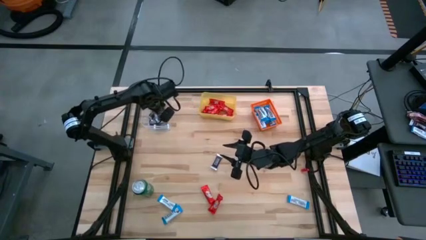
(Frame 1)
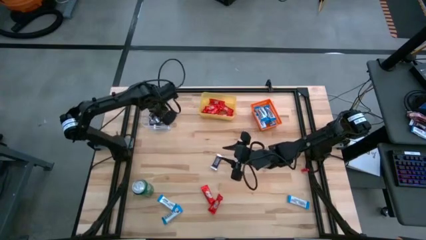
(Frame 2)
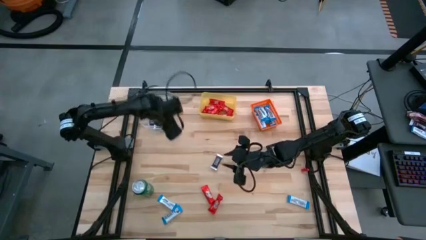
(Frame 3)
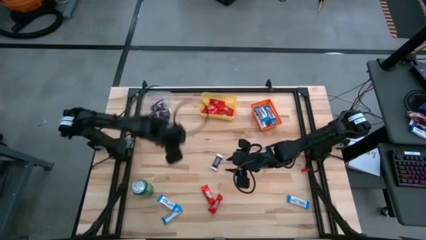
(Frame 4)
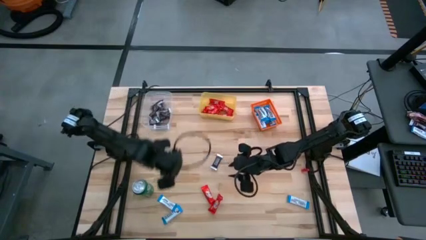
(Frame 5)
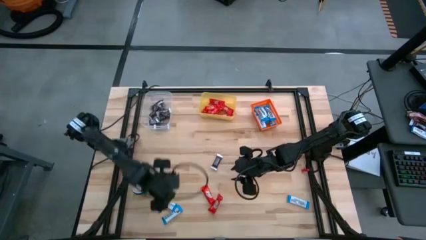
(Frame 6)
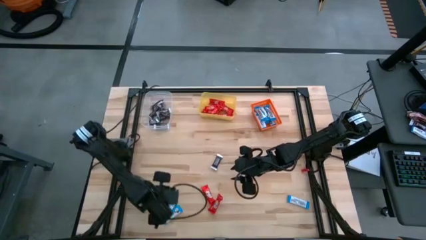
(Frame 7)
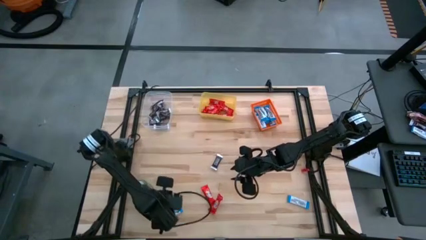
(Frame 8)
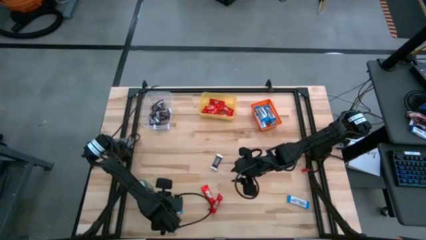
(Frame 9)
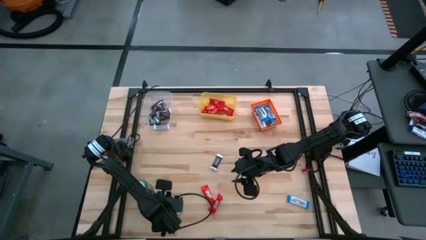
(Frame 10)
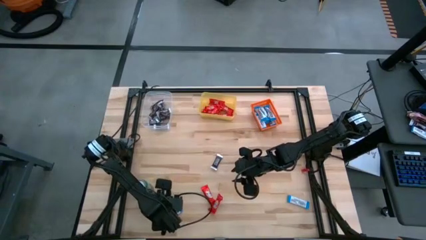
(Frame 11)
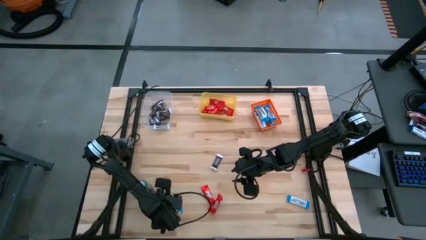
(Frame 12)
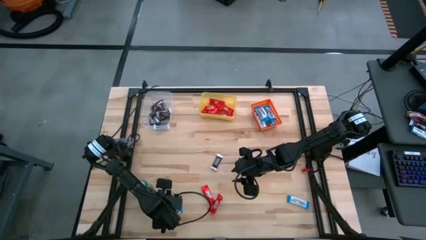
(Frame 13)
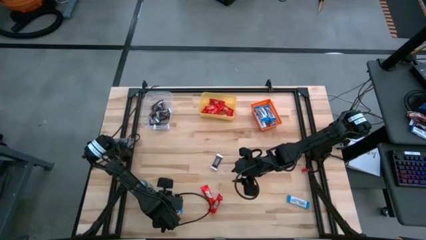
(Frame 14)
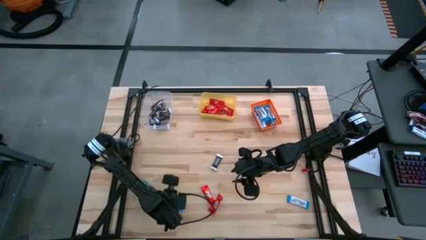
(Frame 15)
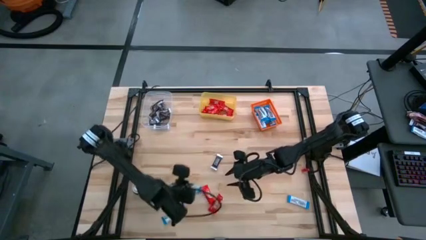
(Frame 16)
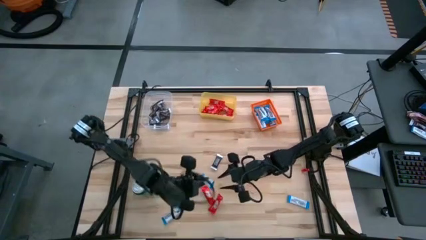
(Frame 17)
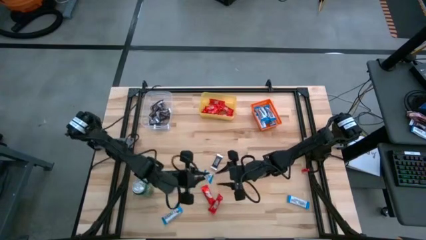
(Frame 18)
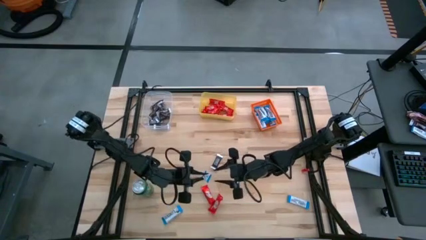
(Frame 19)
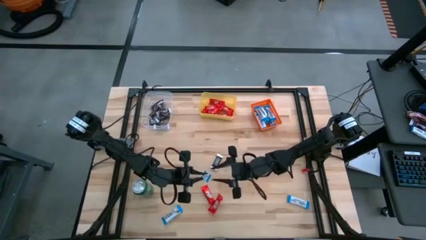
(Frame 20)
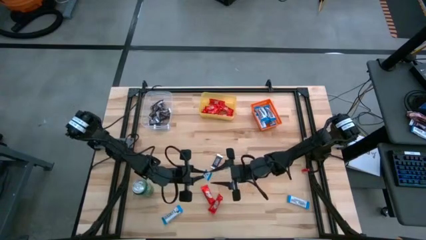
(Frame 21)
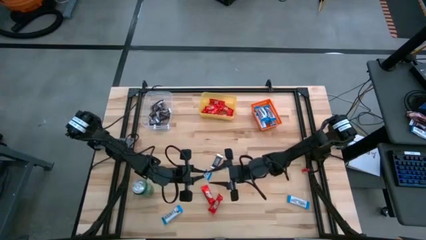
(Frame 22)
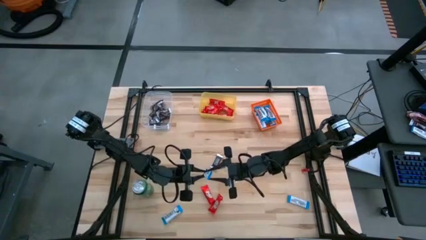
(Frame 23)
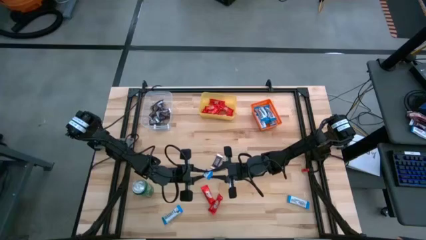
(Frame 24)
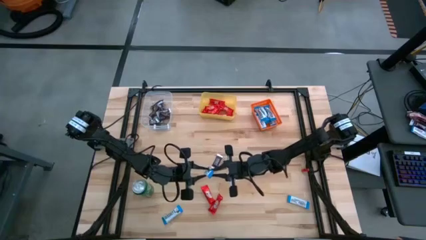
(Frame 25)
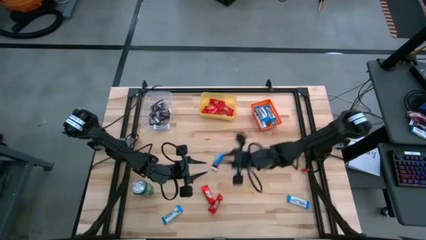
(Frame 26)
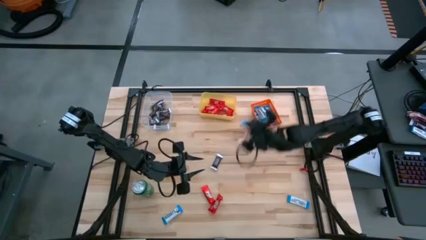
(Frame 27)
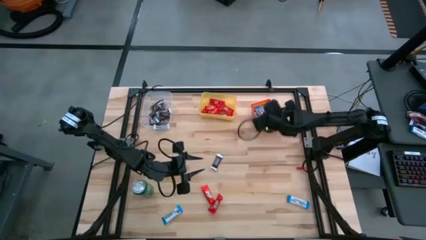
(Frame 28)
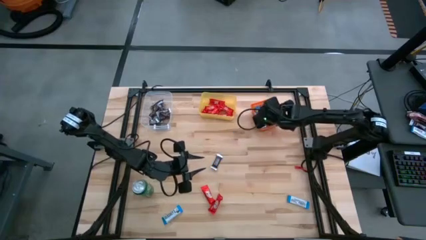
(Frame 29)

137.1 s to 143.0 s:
Task: Sort candy
Put the white chocolate bar into the orange bin

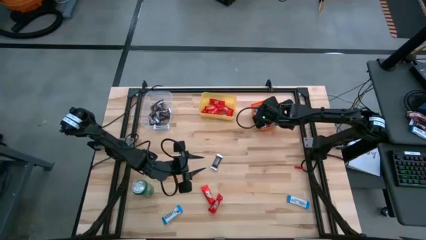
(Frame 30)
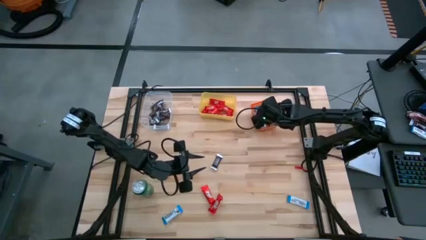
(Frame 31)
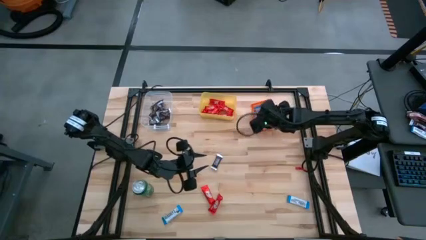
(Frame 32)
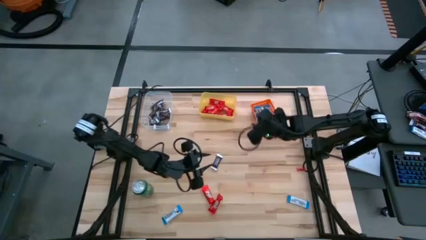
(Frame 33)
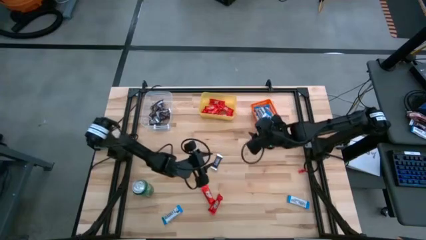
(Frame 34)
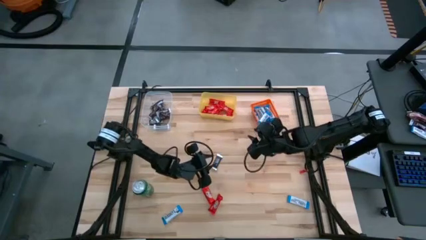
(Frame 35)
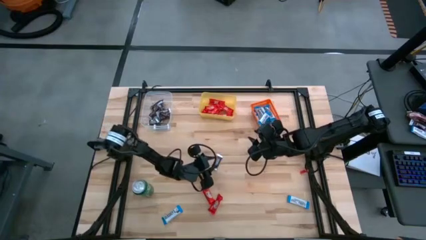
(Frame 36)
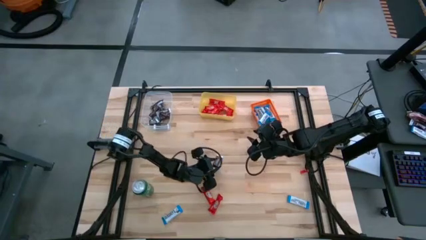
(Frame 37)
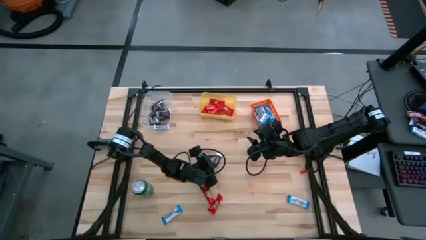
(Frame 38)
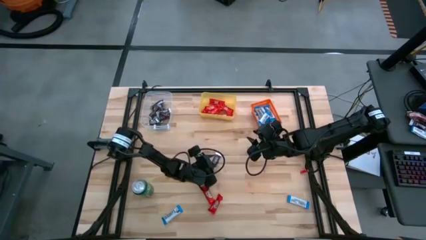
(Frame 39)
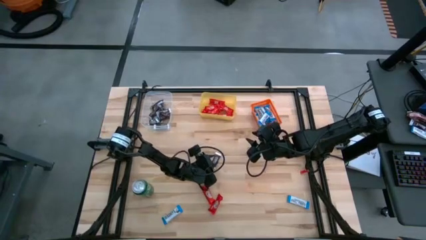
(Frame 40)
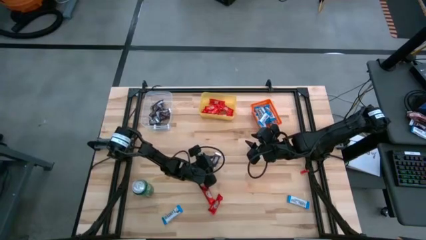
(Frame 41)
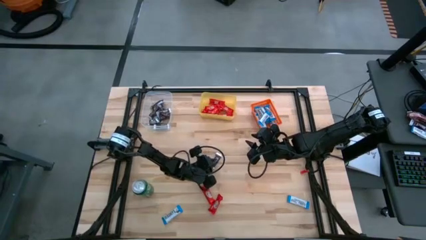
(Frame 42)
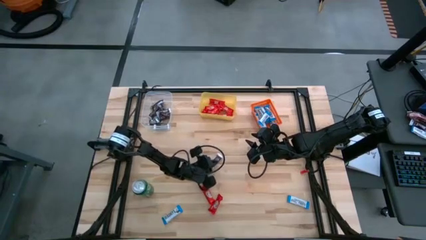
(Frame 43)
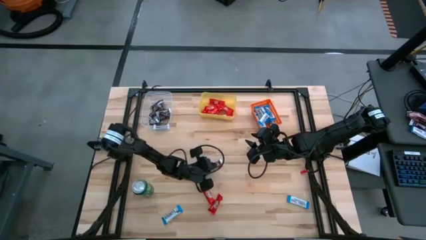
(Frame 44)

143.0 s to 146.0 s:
Put the brown chocolate bar into the transparent bin

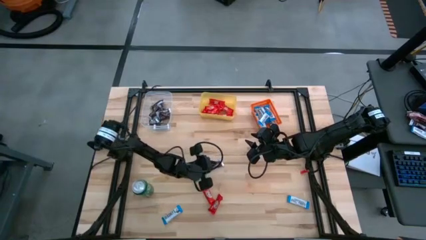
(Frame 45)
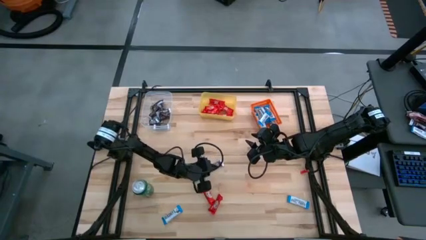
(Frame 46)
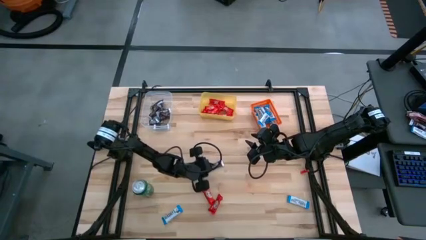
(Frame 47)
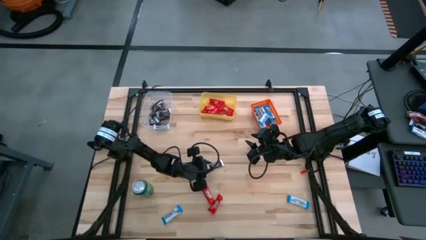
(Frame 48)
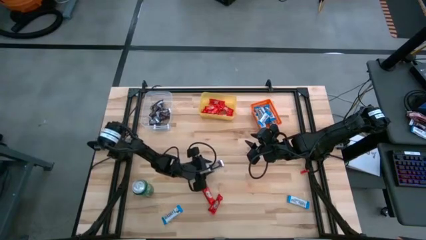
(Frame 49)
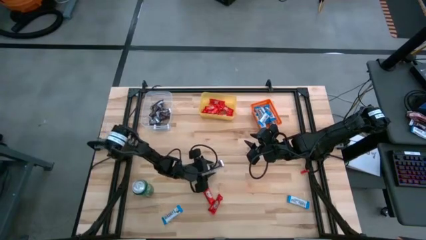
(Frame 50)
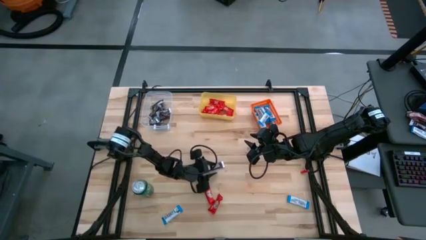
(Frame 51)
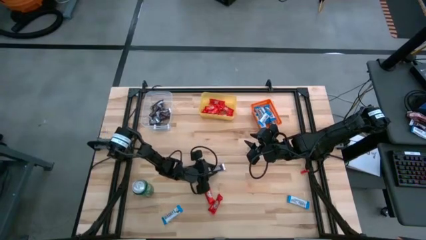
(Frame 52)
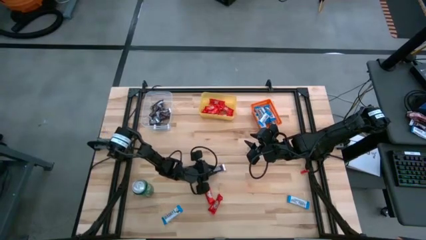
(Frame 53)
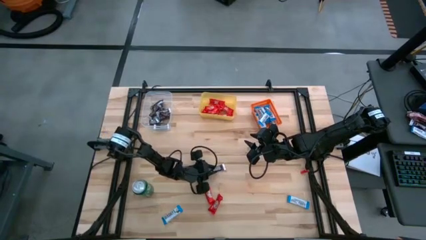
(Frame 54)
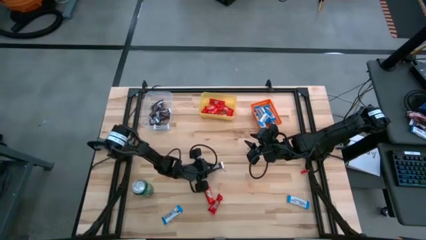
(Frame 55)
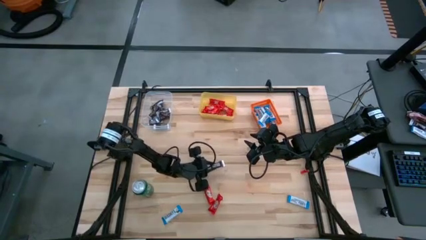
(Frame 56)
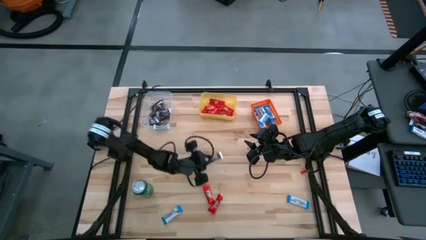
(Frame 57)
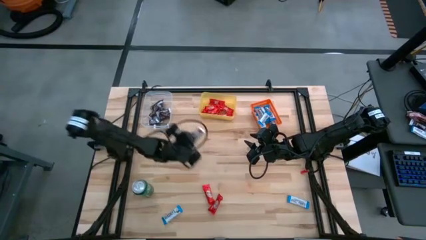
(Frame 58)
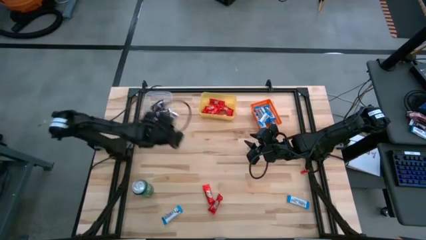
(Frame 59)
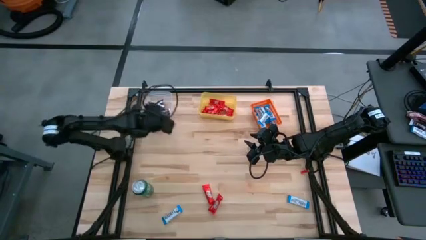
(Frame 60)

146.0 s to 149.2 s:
Put the brown chocolate bar into the transparent bin

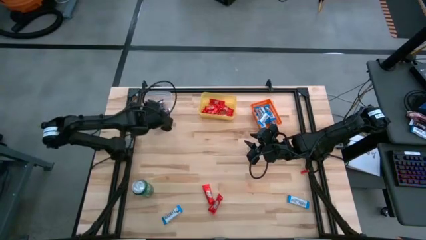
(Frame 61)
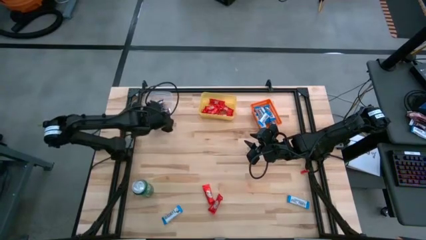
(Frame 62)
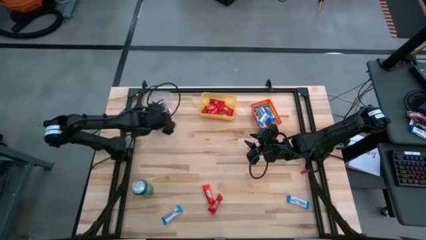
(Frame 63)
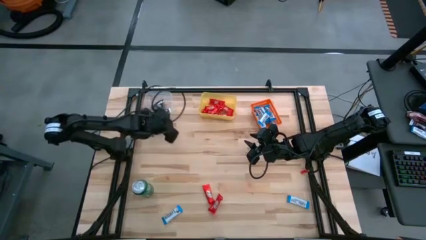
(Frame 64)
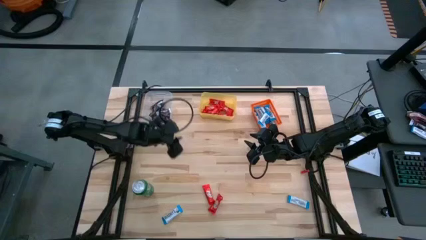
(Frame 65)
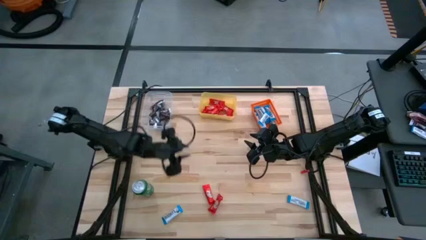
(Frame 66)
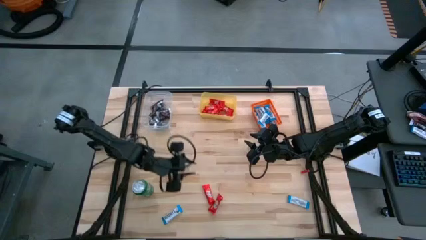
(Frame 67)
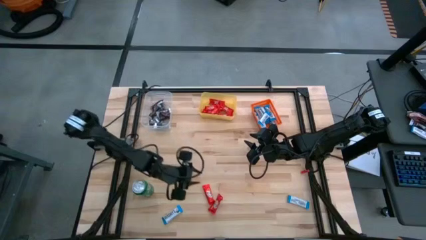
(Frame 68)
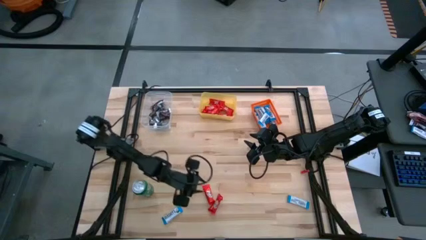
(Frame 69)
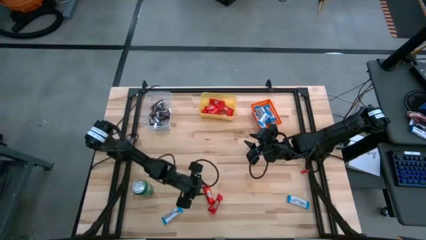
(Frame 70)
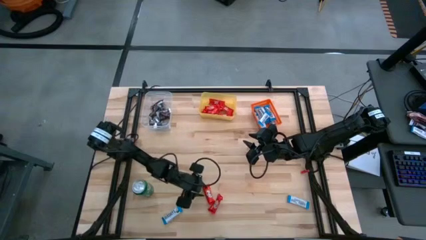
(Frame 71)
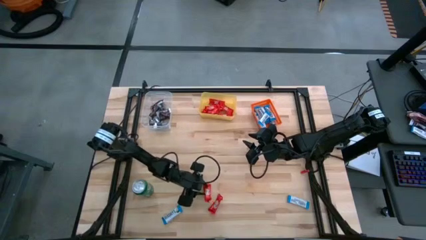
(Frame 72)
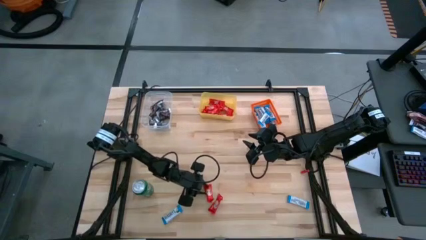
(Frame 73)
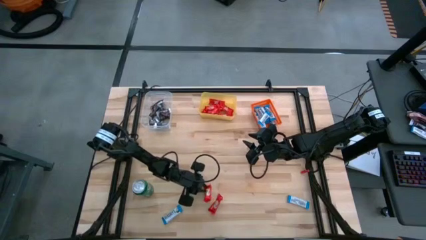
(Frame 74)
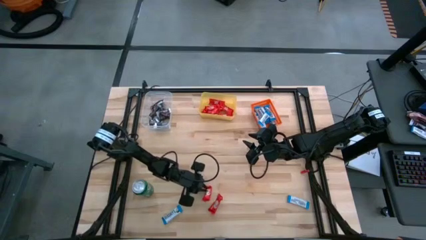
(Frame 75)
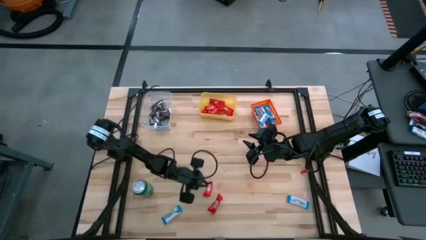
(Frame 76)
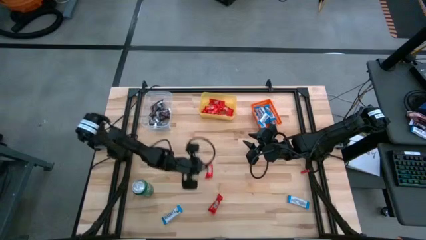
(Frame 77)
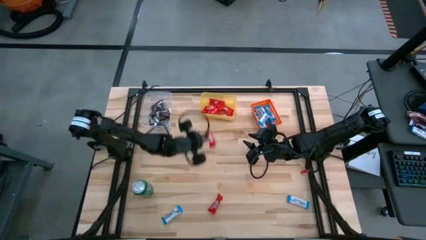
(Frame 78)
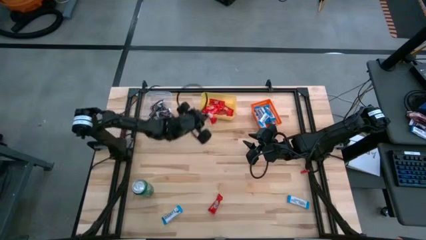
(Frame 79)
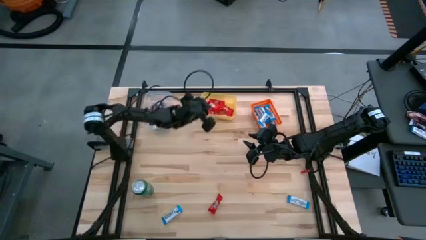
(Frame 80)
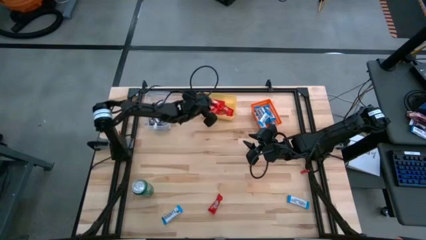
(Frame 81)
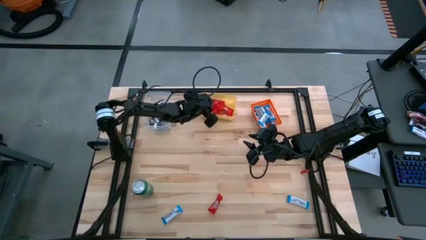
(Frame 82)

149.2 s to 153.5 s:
Put the red chocolate bar into the yellow bin
